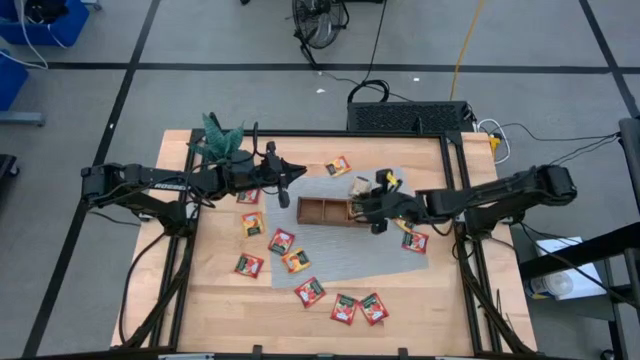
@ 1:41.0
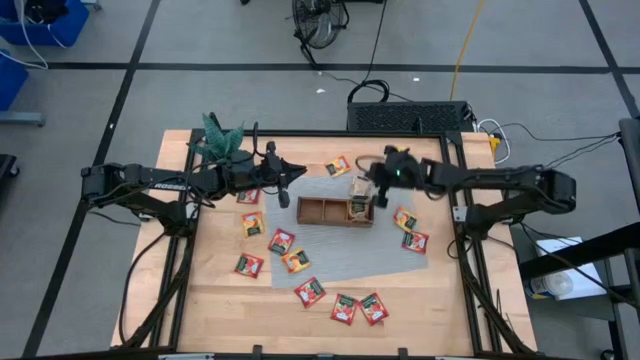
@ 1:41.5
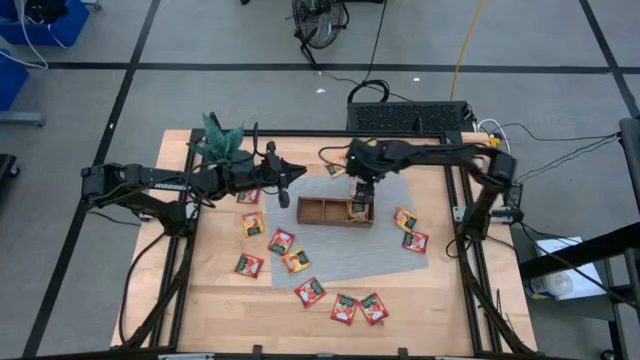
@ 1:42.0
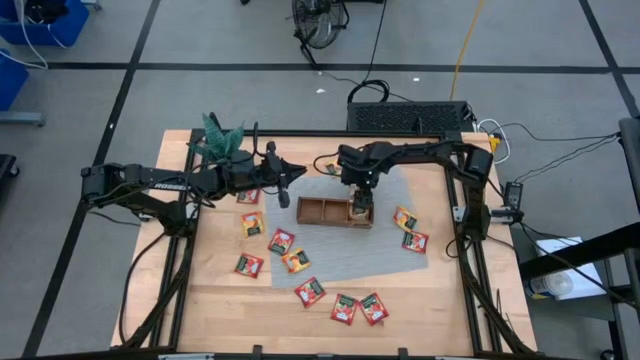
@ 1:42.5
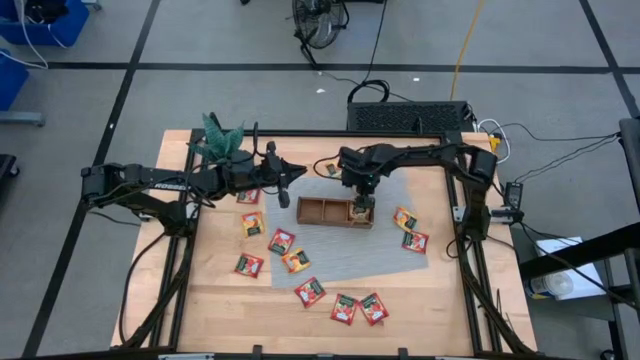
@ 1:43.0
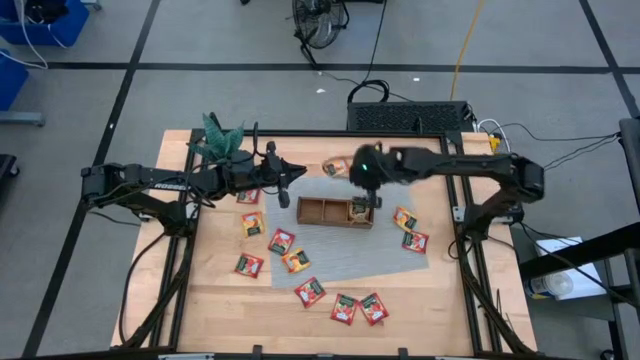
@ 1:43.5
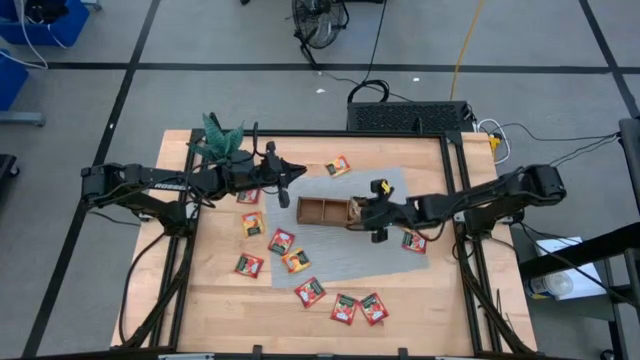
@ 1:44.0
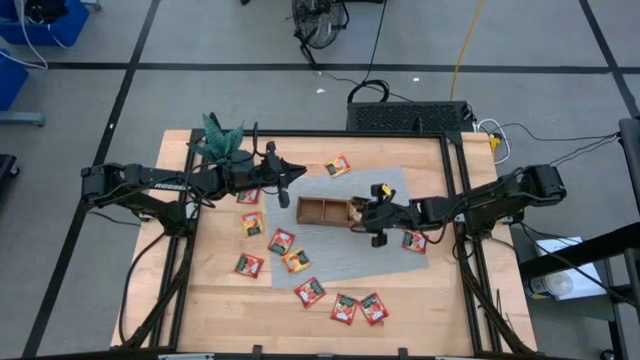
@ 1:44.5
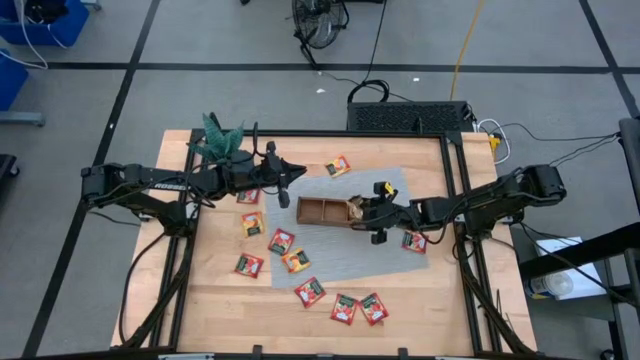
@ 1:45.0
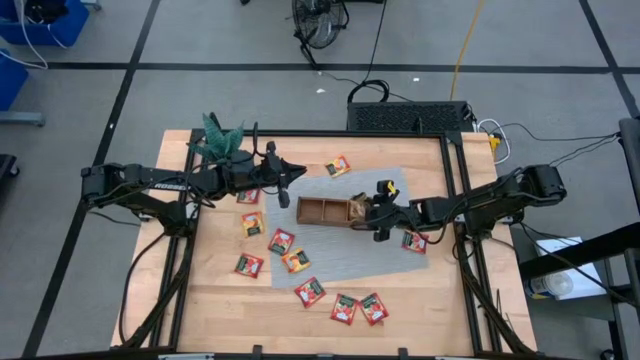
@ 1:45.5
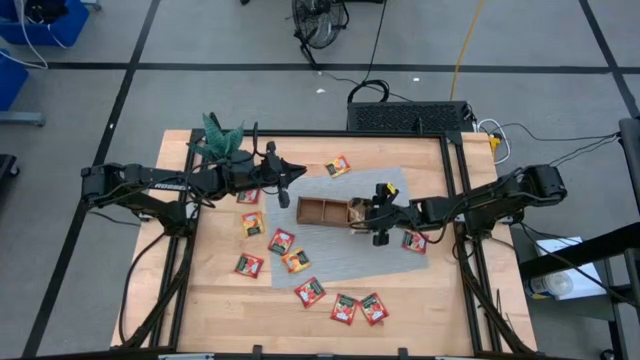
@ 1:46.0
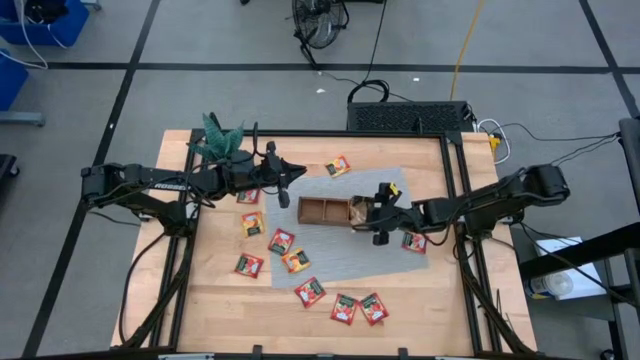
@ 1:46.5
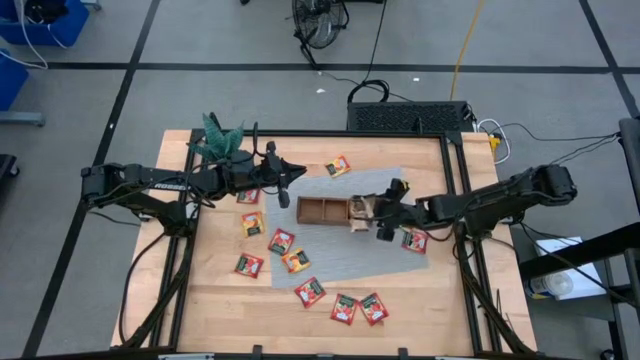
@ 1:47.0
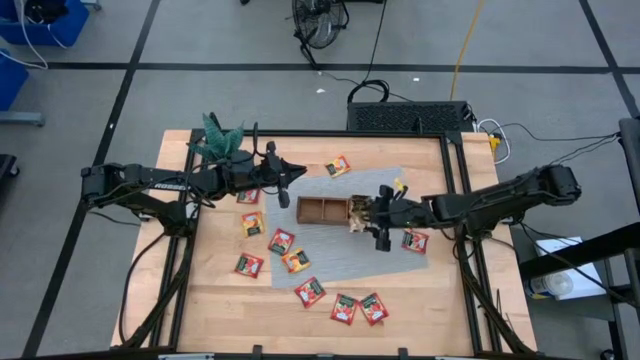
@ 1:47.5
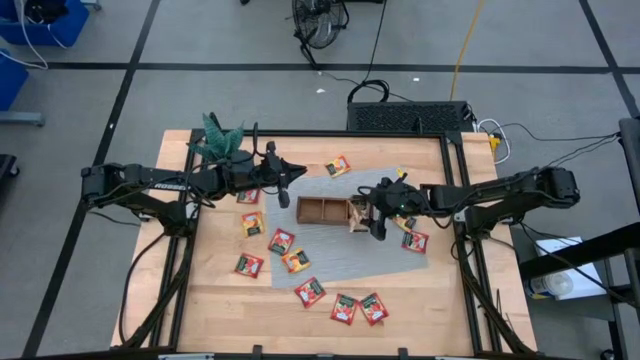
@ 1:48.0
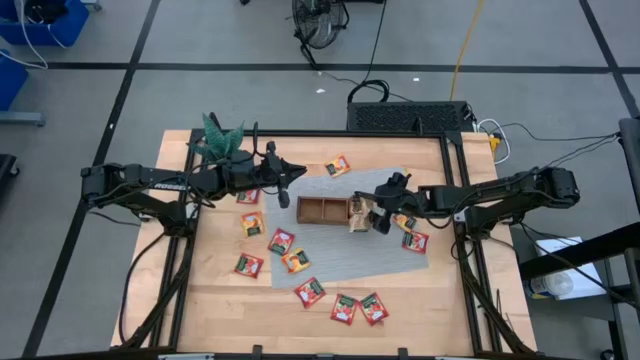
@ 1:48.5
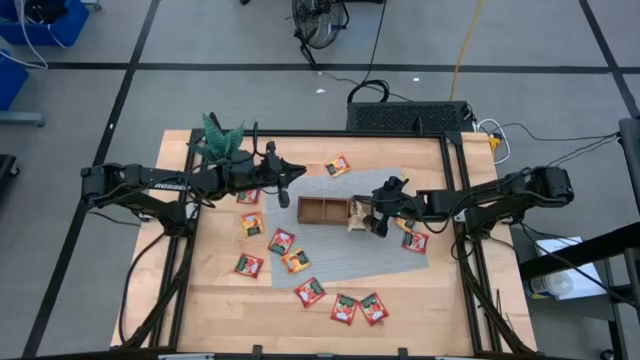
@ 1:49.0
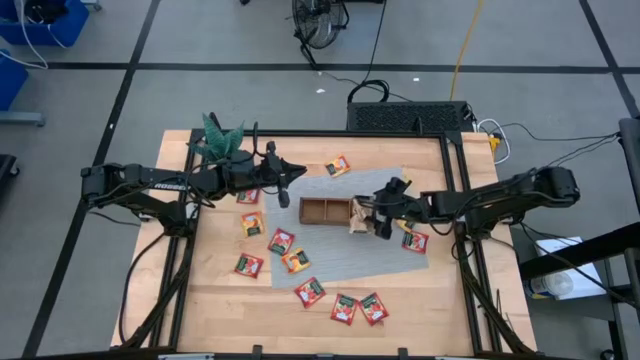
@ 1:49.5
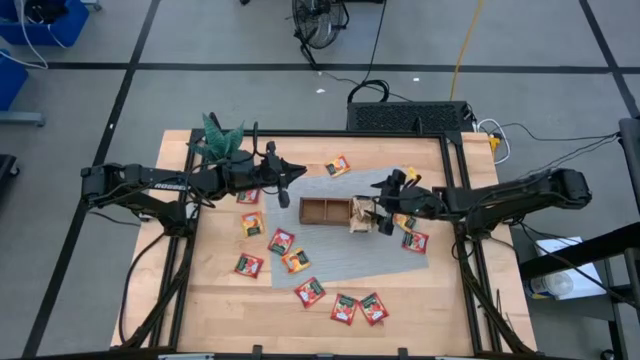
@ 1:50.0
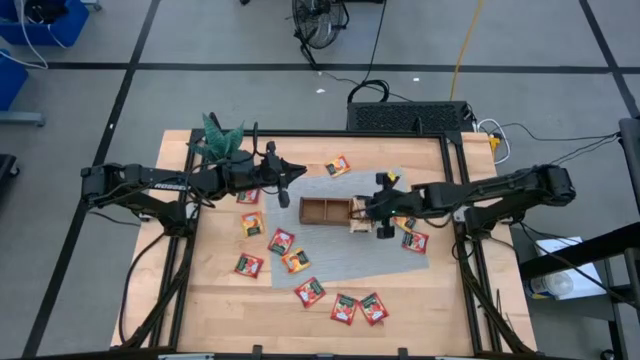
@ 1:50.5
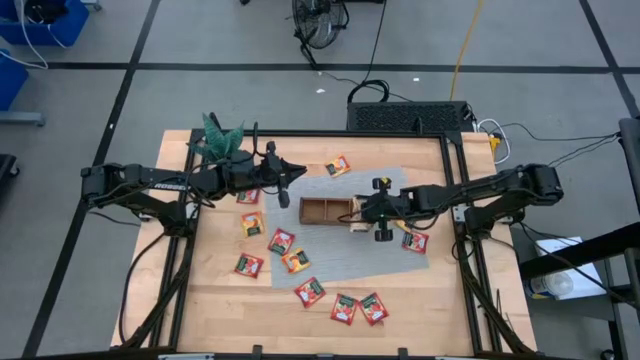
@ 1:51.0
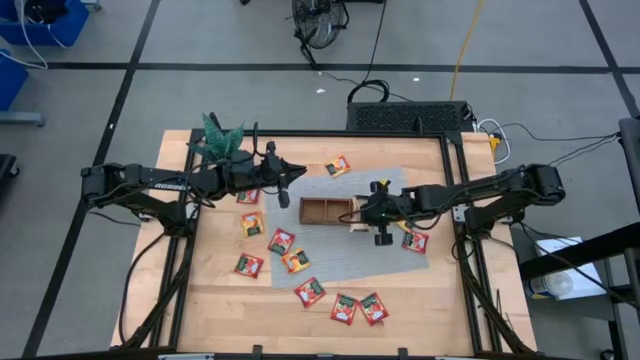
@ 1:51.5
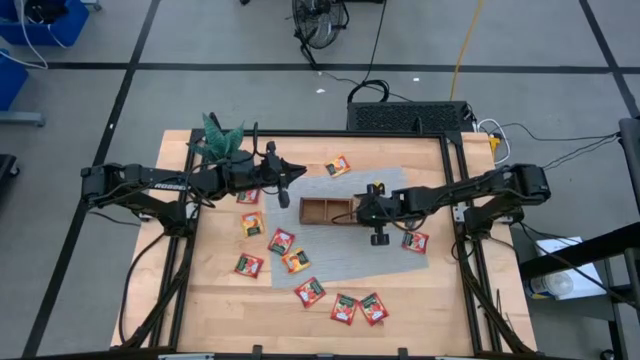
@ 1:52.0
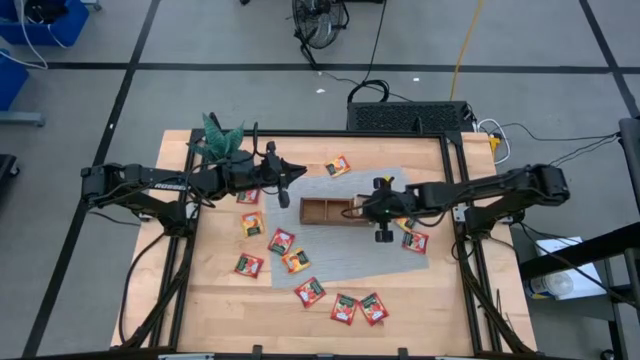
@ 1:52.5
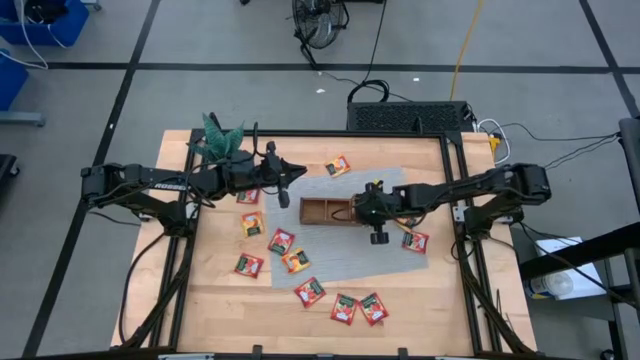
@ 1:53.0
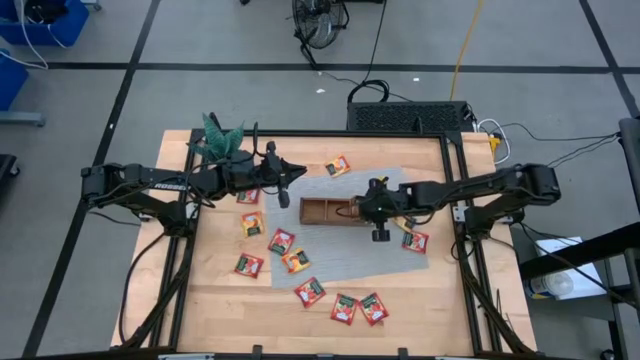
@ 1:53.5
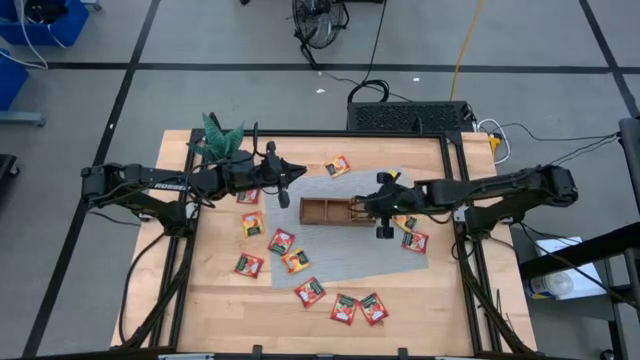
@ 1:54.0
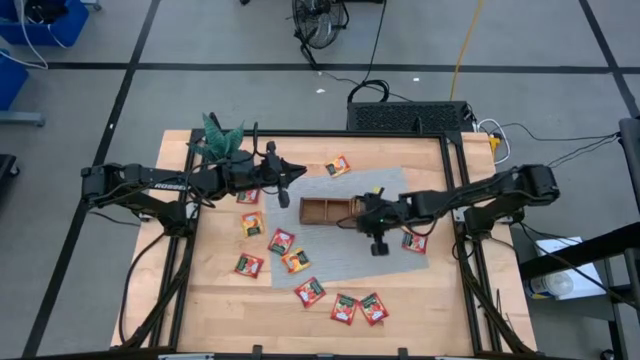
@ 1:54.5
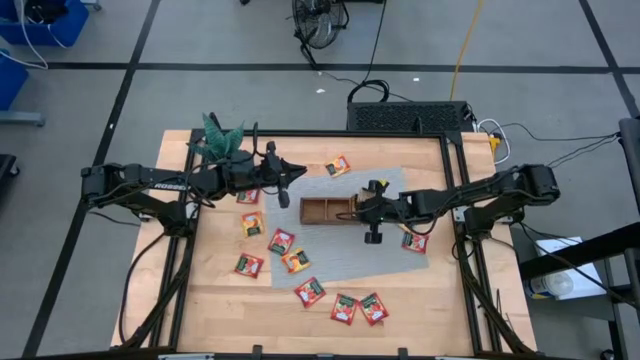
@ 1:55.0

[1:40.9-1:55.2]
Task: Pick & Place Tea
Put the top brown tea into the right part of the wooden organizer

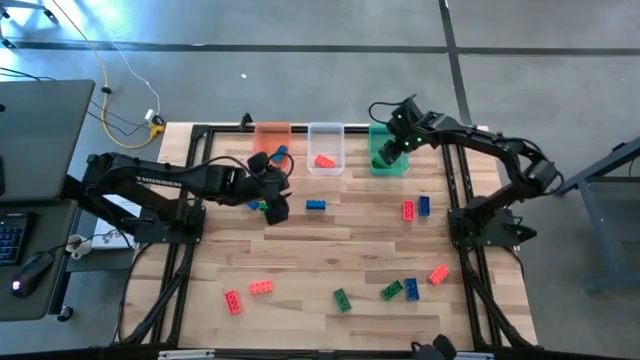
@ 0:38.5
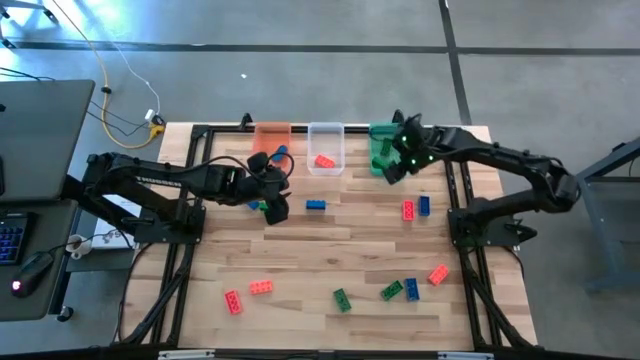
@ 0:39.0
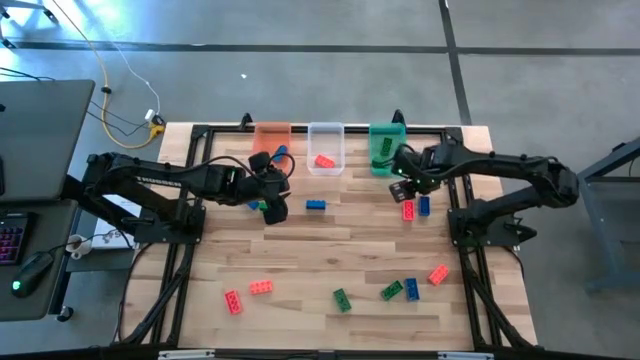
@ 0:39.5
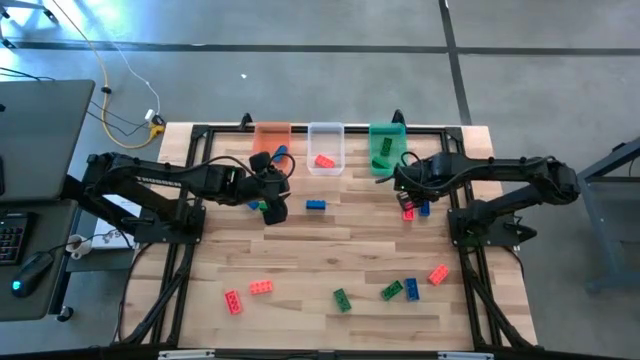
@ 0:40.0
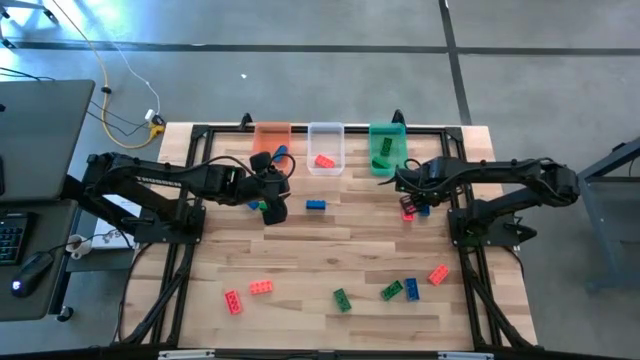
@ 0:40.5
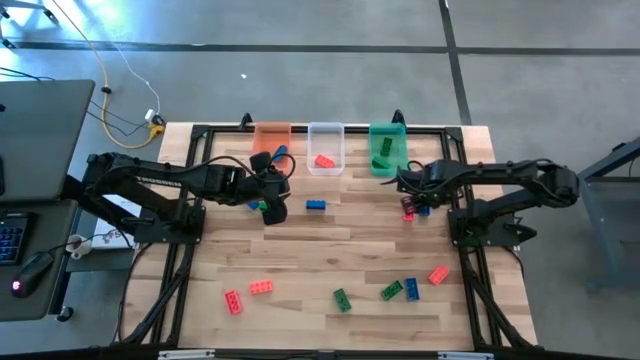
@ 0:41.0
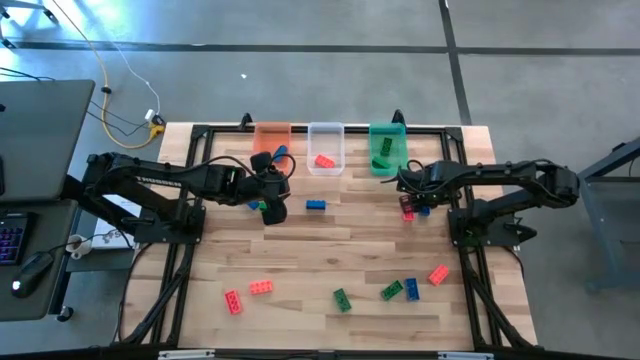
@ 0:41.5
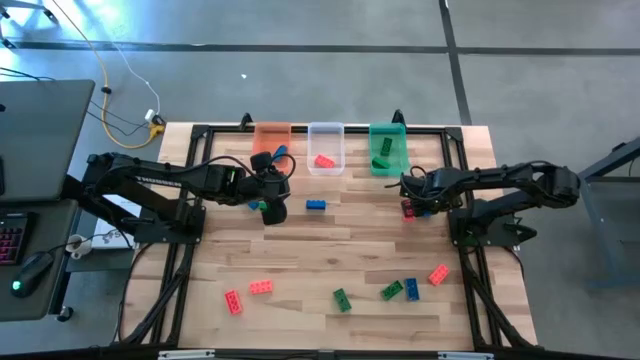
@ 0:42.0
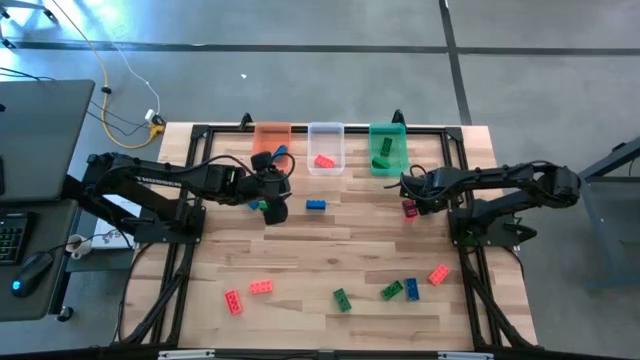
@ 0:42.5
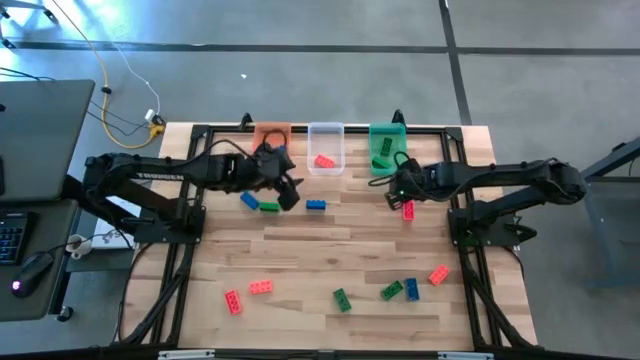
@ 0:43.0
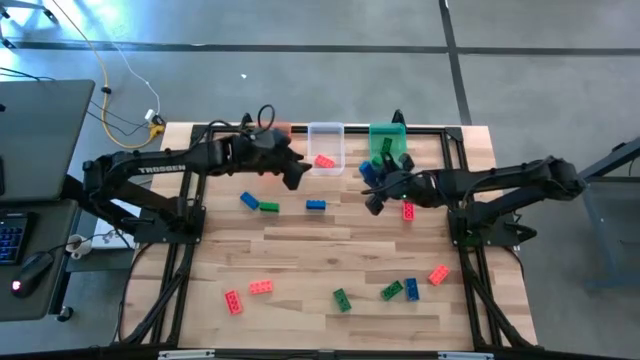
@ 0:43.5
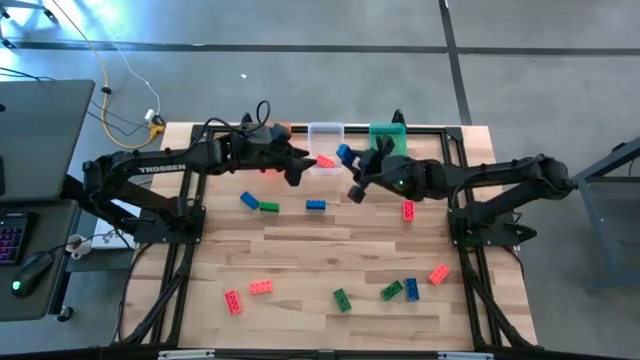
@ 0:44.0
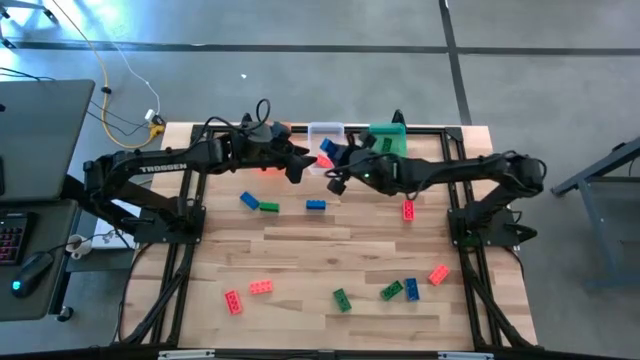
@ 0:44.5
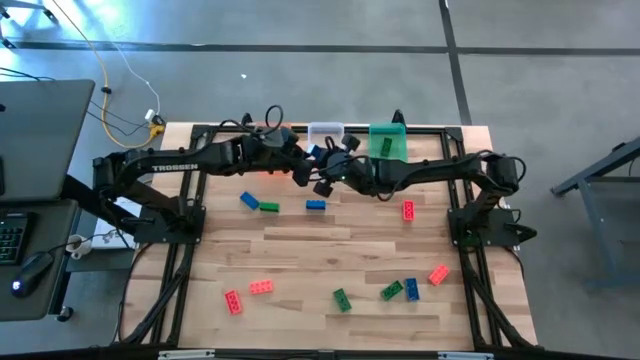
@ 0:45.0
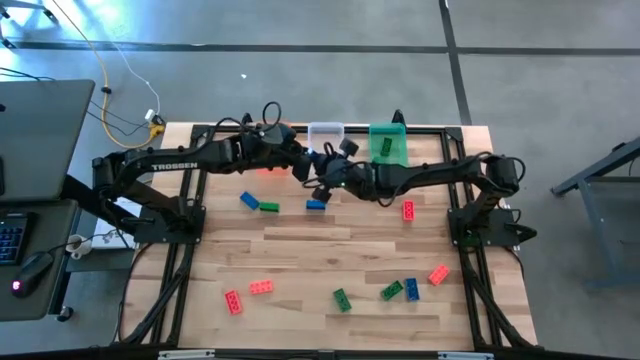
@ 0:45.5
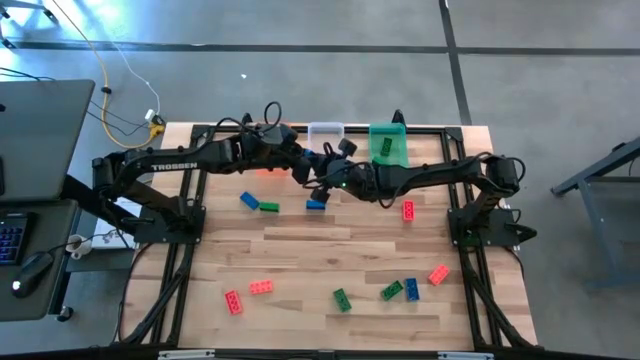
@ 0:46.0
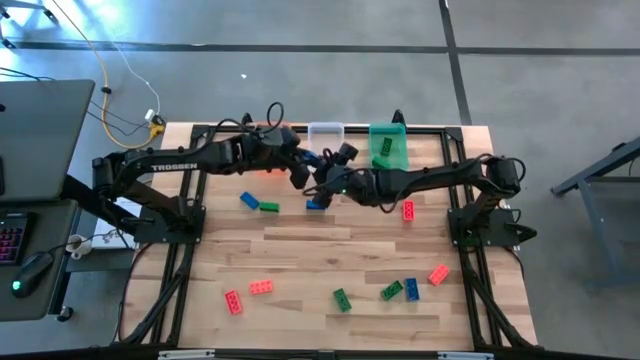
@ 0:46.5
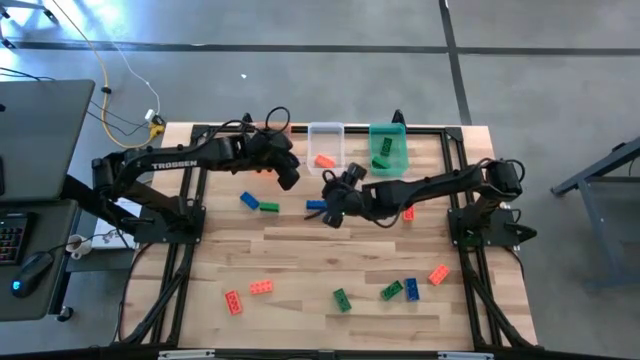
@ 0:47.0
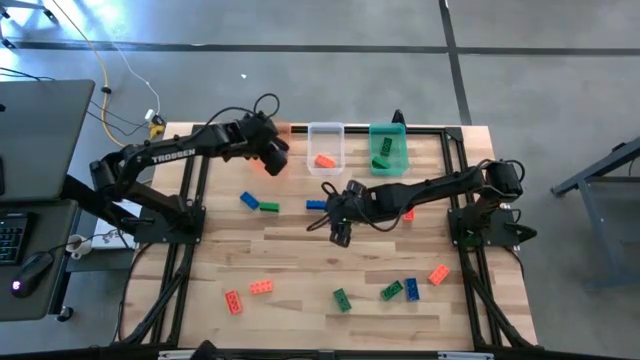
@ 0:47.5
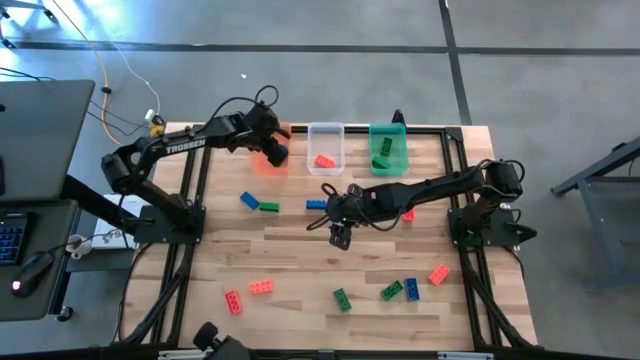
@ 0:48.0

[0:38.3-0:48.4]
Task: Sort & place blocks by color
Put the blue game piece into the orange bin
